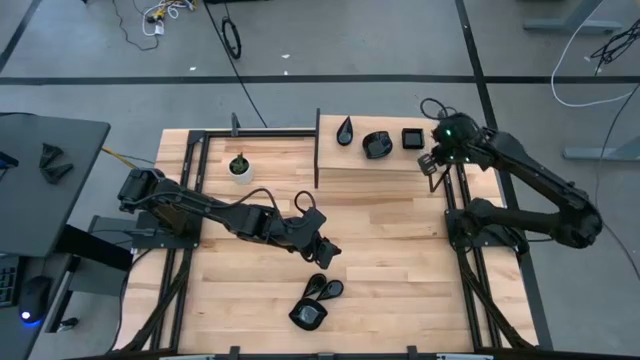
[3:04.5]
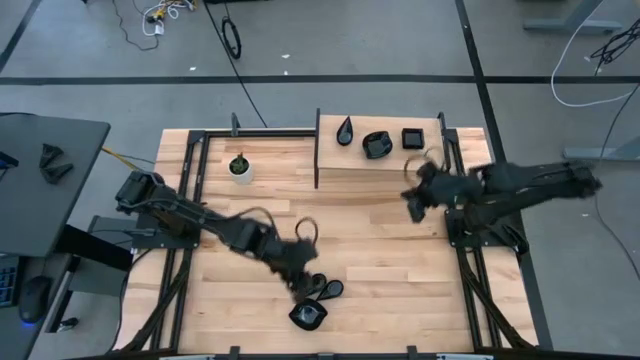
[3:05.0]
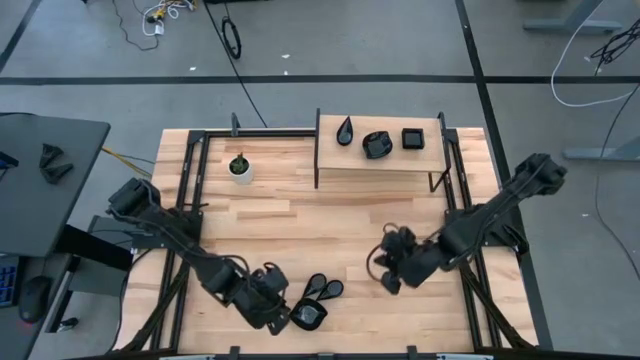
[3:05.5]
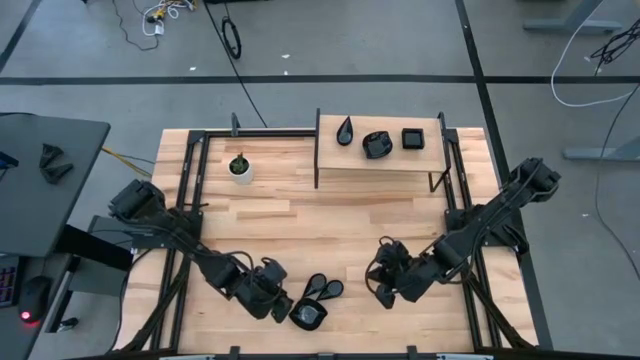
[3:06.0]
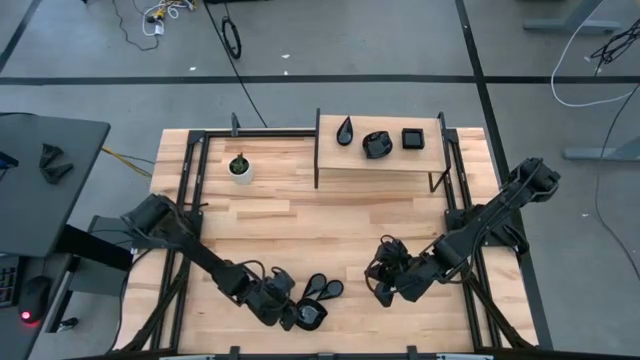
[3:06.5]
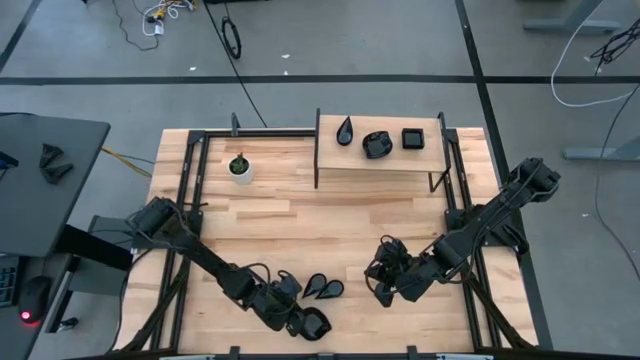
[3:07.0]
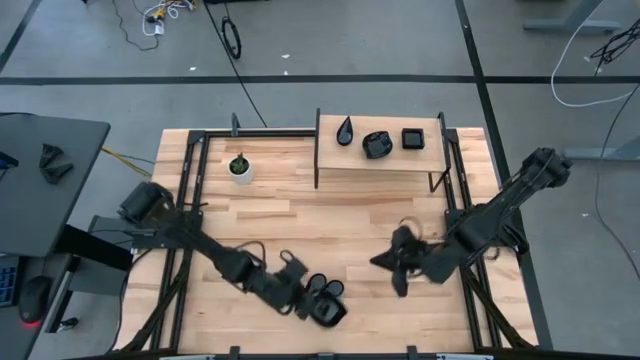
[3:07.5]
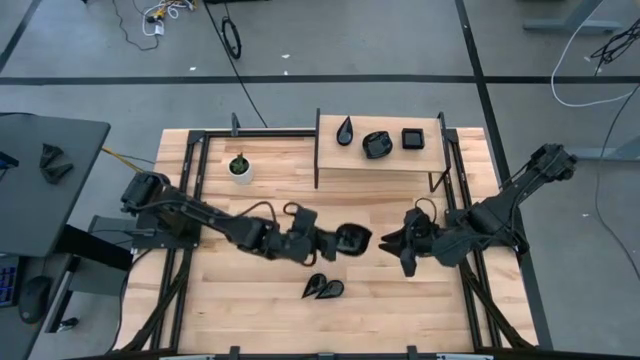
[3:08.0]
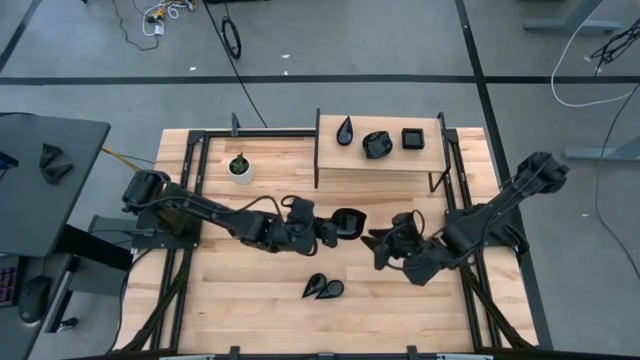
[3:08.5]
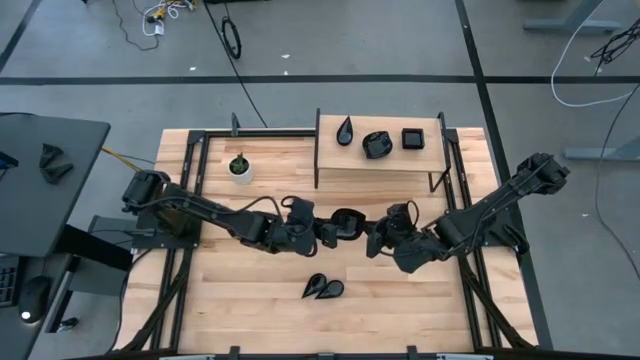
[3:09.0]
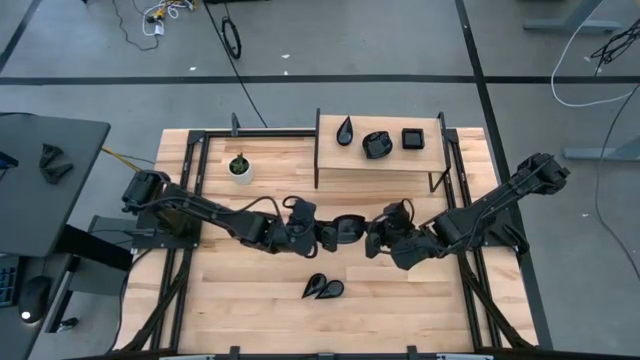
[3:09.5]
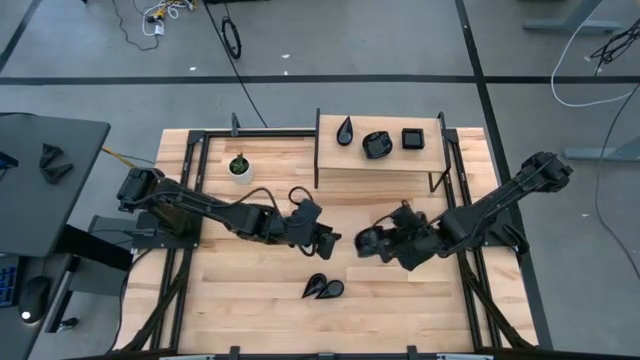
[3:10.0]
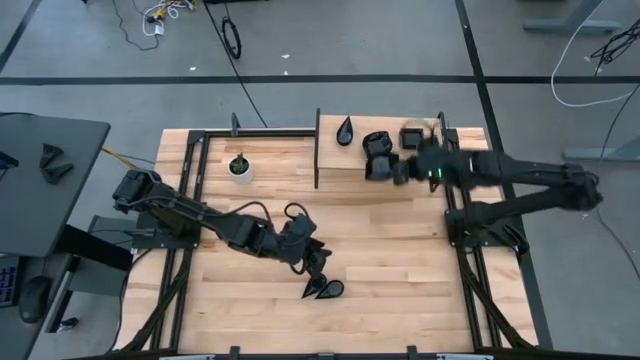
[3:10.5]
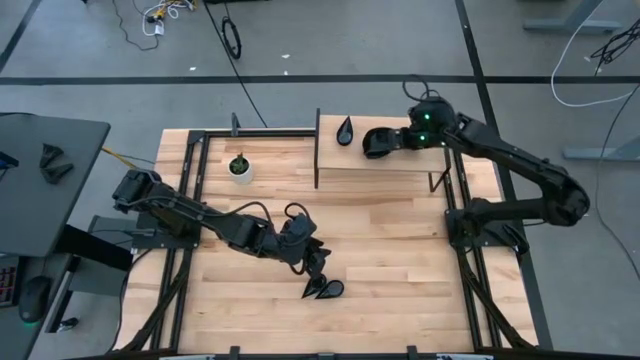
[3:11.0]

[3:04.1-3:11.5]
Task: Pick & Place Mini shaped plates
Stack the leaf-shaped plate on top of the leaf-shaped plate on the shelf

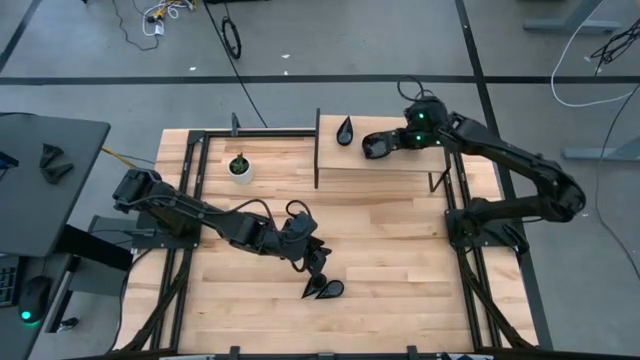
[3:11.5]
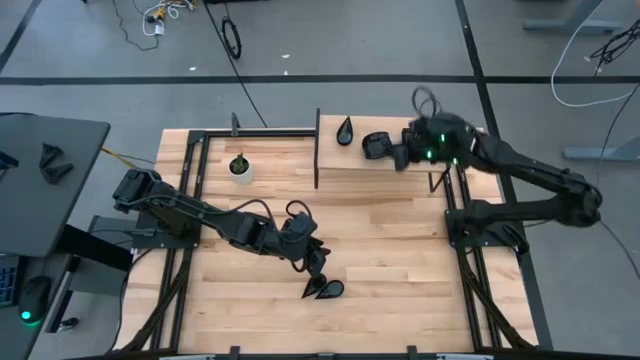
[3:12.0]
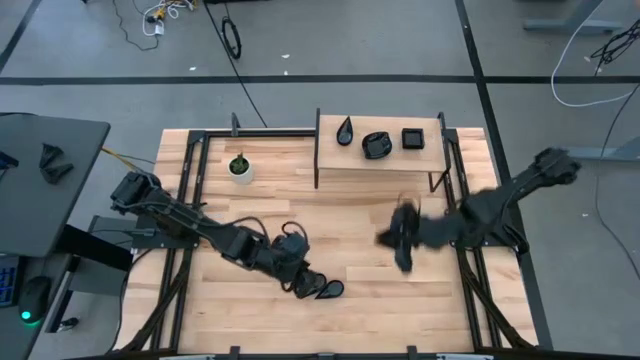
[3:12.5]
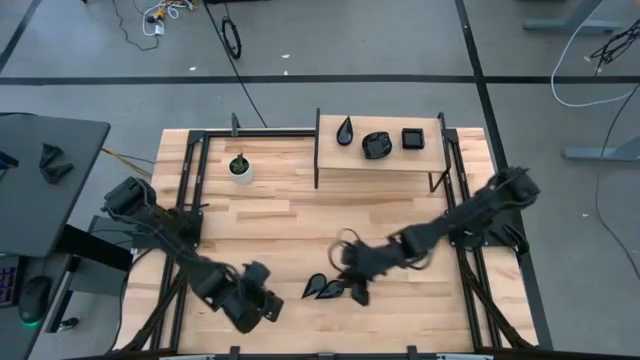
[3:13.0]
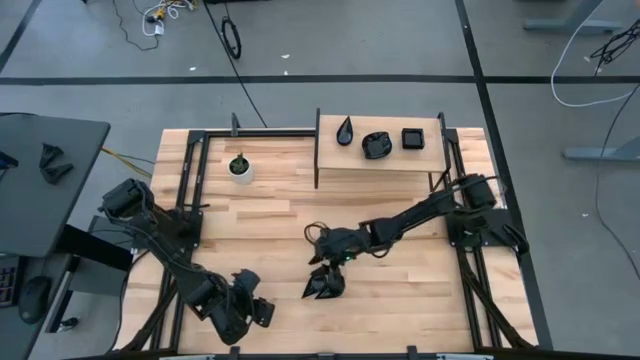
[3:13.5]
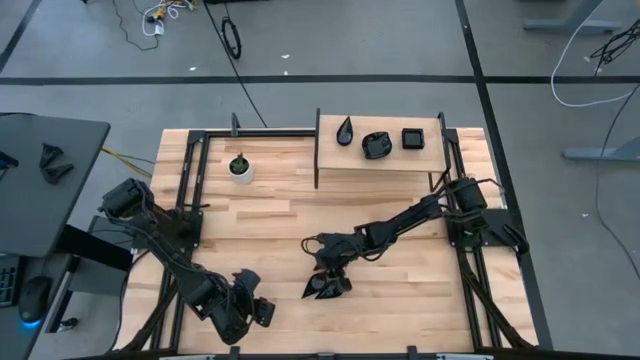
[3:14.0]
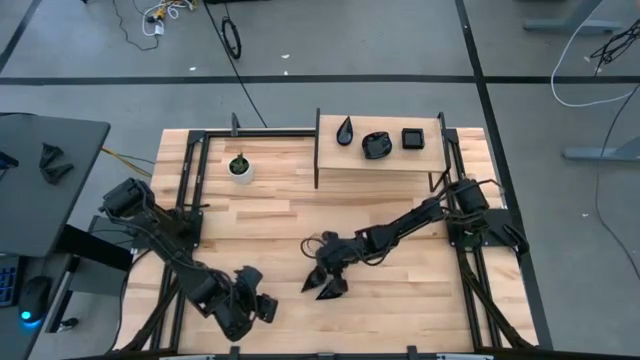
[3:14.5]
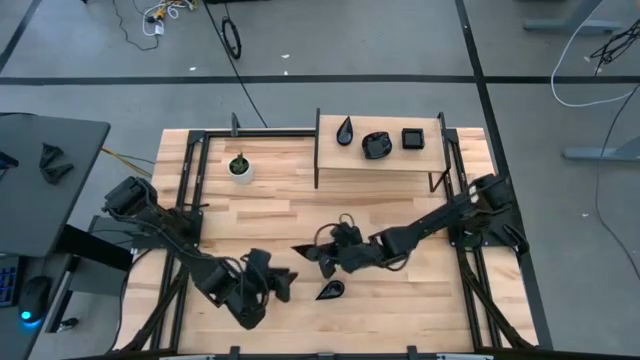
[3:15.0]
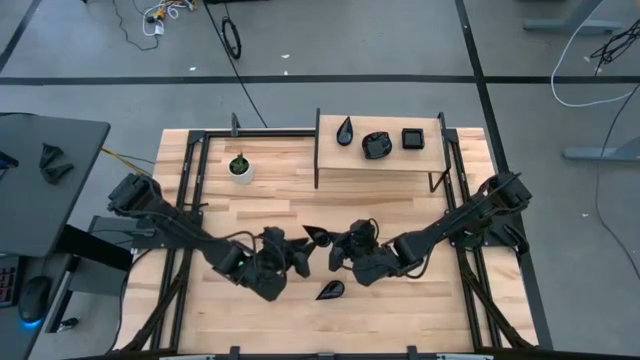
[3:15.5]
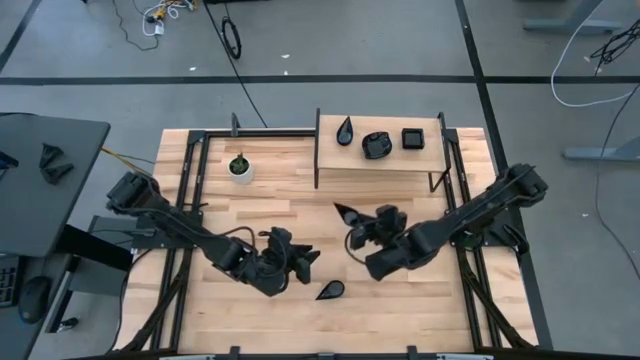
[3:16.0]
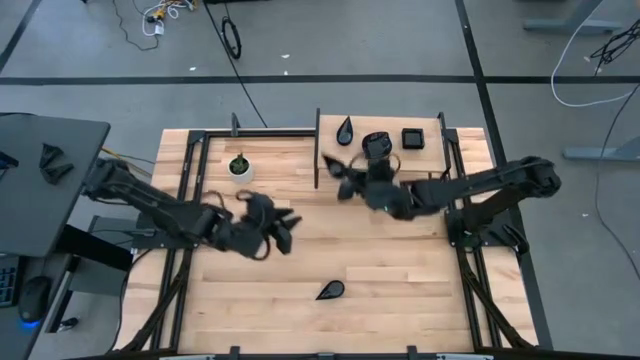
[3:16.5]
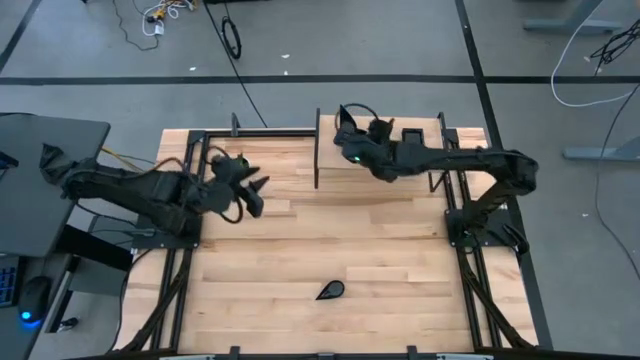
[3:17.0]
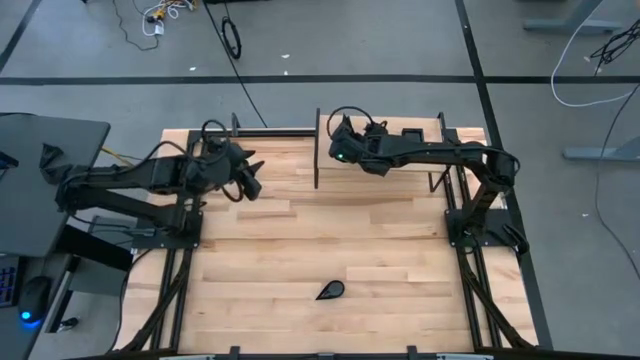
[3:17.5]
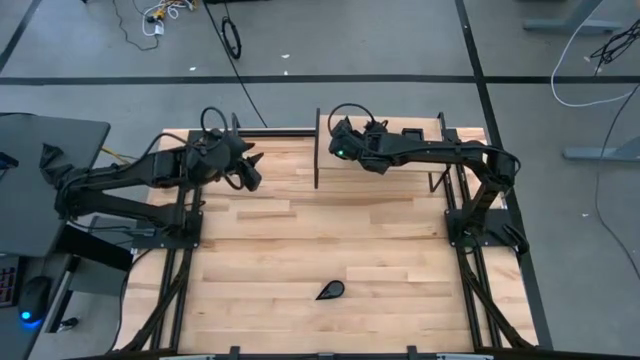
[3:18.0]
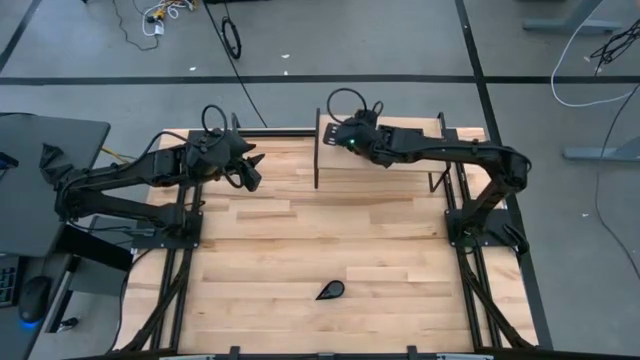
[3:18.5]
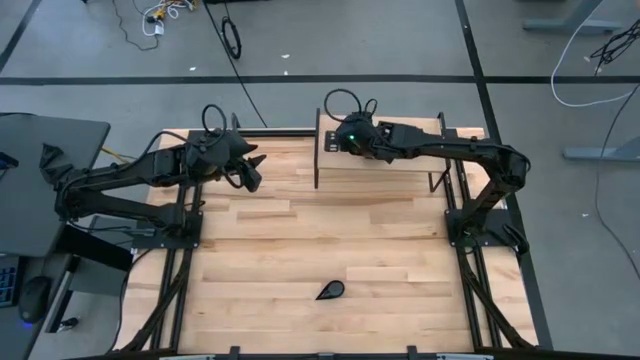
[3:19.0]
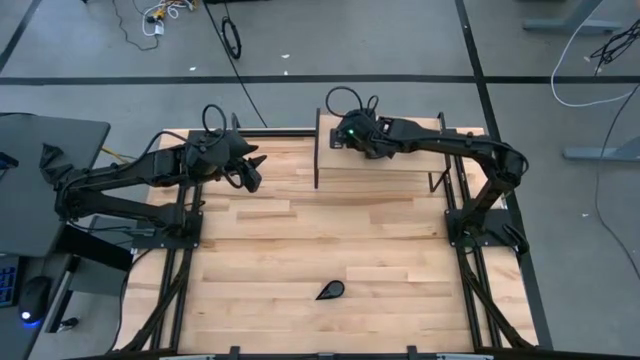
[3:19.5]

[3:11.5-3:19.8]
Stack the drop-shaped plate on top of the drop-shaped plate on the shelf

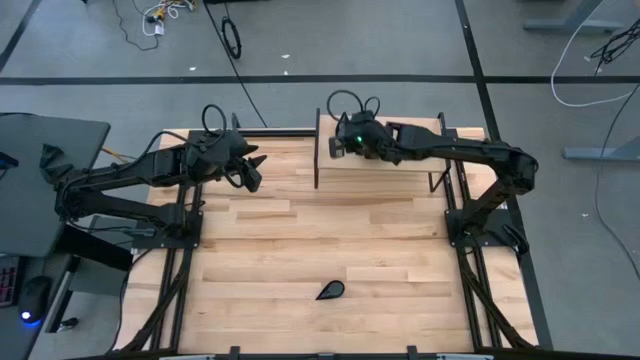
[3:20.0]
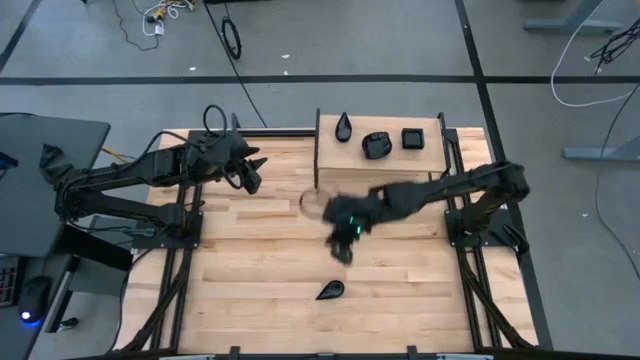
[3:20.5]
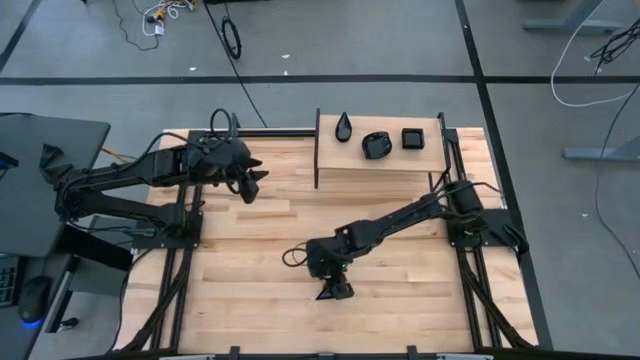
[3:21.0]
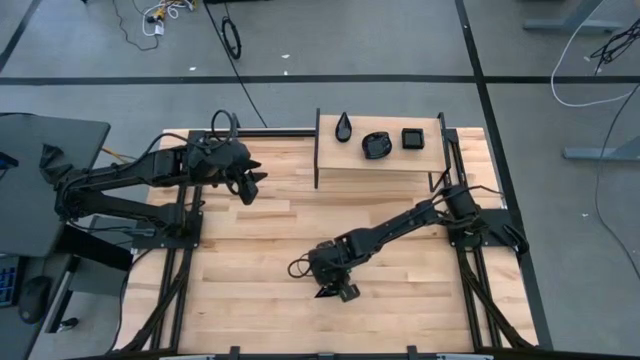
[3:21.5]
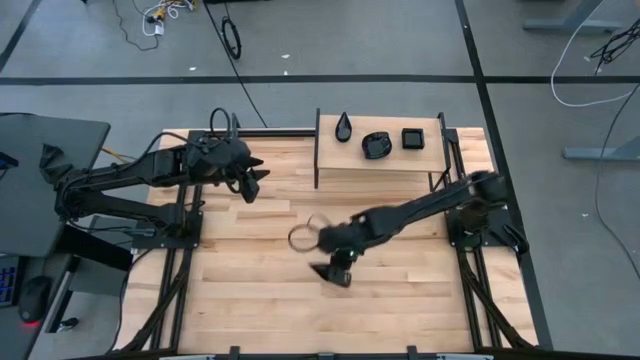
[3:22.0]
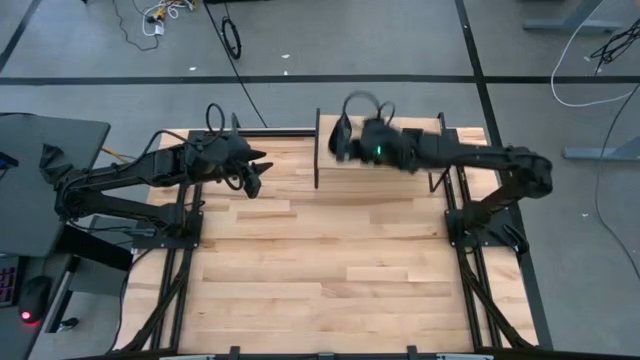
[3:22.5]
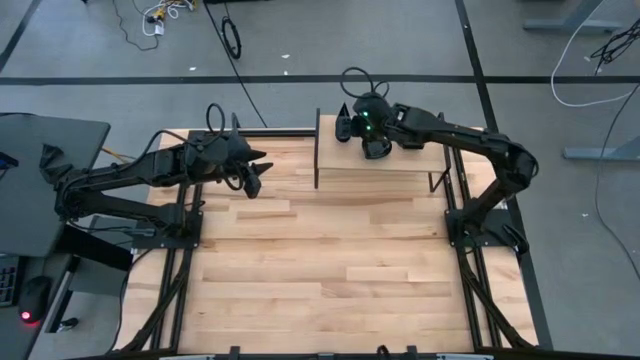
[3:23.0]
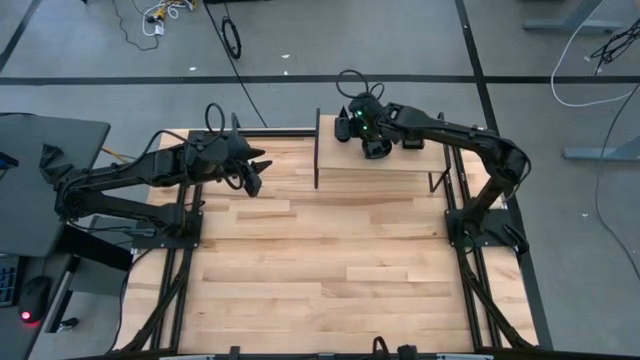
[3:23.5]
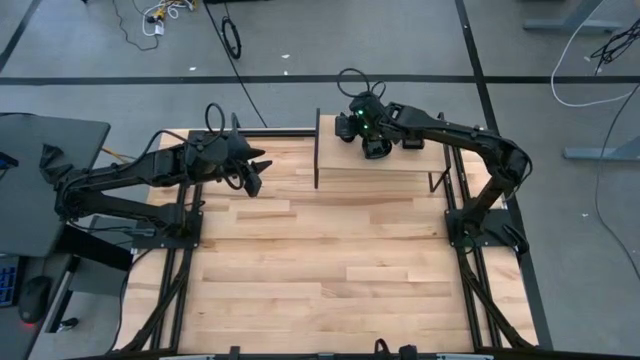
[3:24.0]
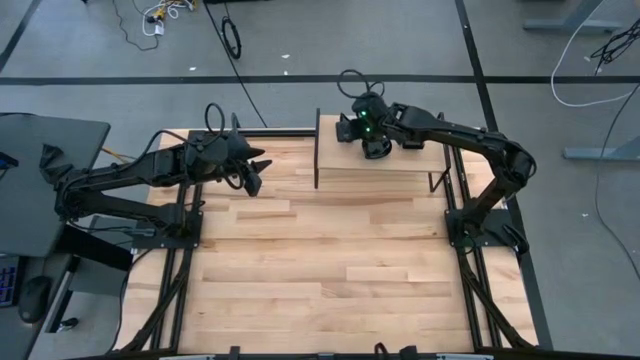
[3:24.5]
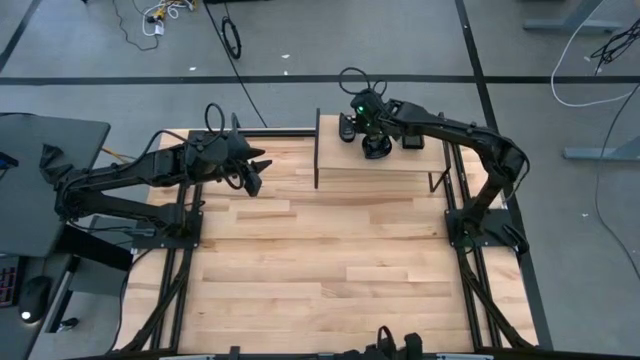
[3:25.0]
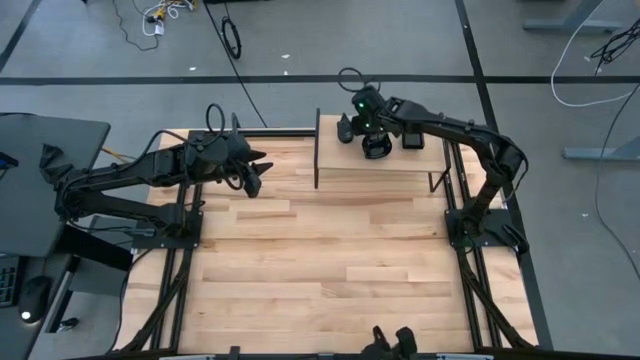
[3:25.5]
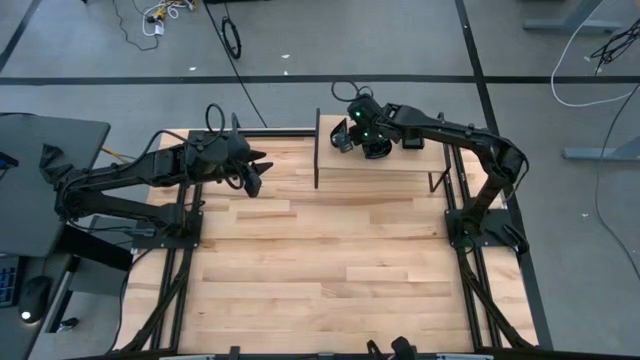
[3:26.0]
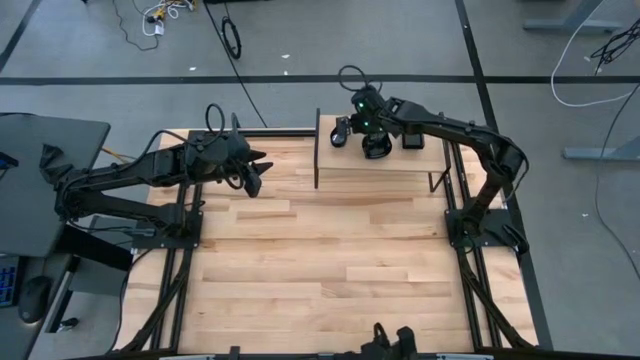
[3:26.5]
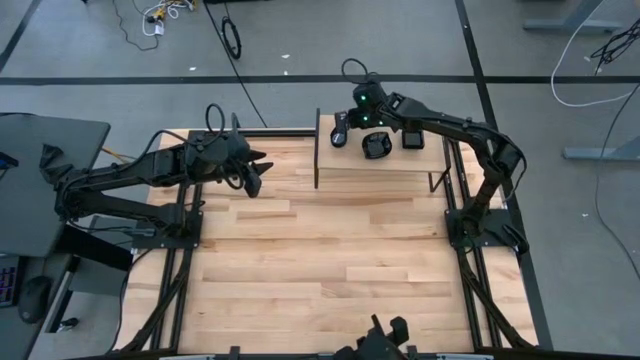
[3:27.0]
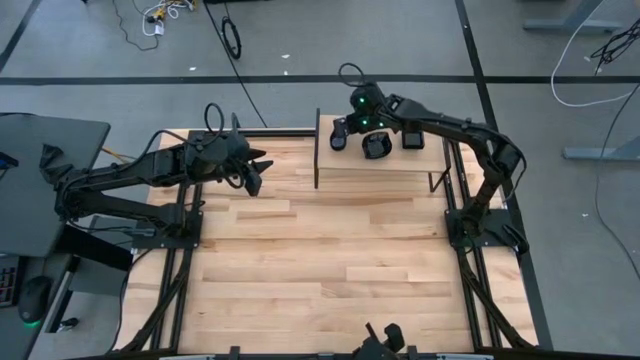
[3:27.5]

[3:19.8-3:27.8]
Stack the drop-shaped plate on top of the drop-shaped plate on the shelf
